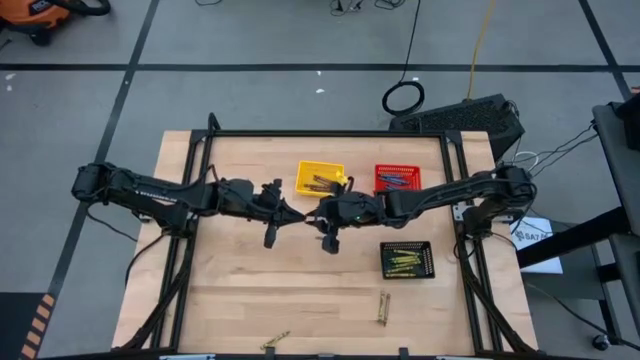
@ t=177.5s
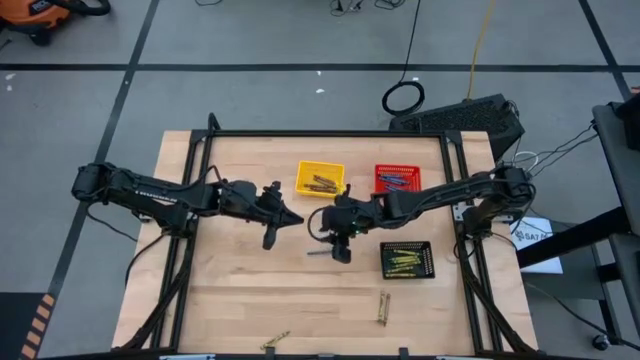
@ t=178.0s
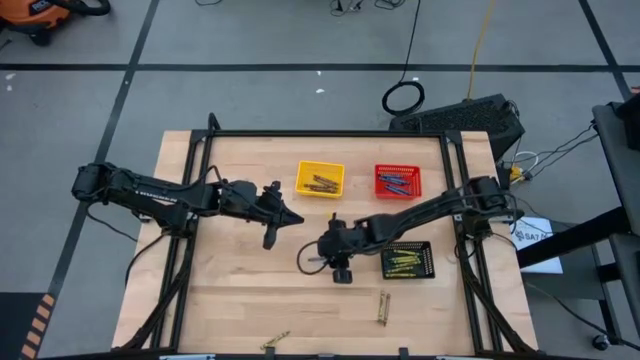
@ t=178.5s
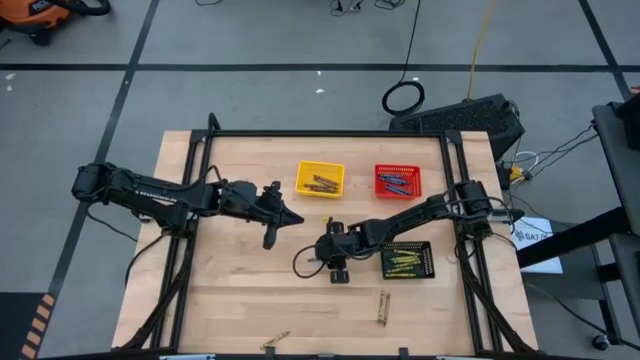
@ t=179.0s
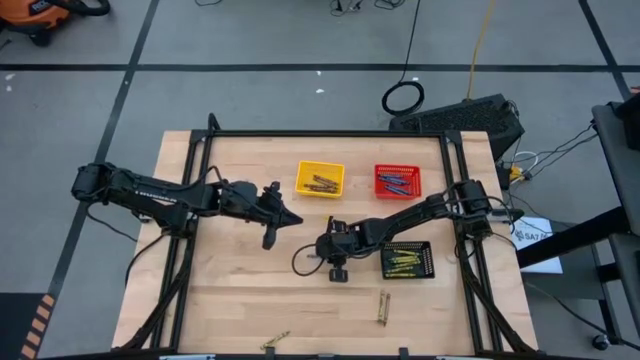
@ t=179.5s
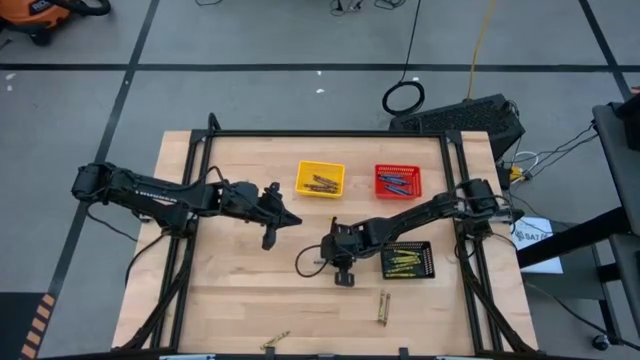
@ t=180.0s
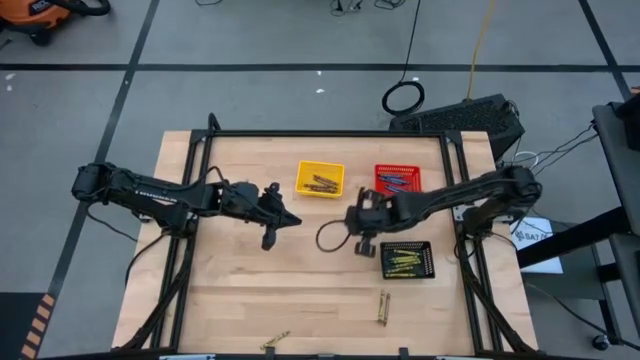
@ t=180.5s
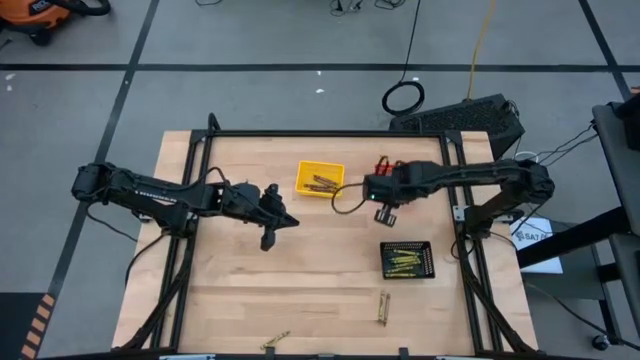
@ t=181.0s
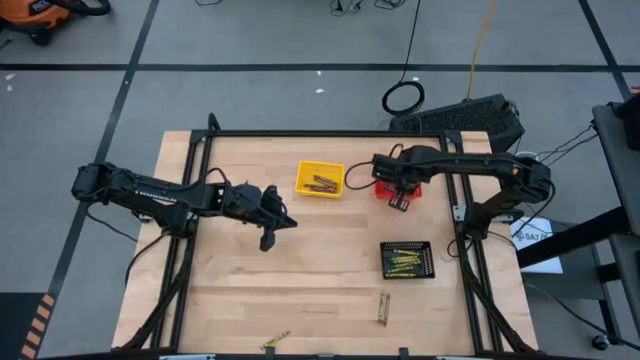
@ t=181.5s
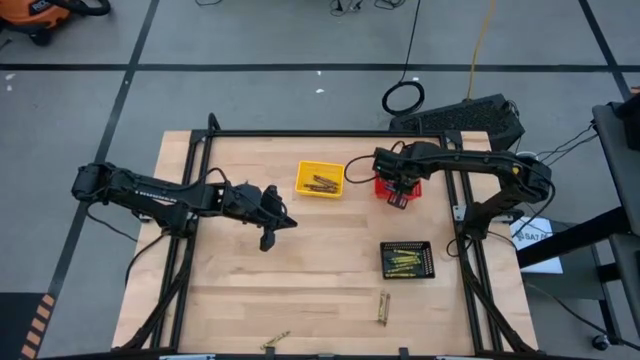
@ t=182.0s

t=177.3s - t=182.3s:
Task: Sort crayons
Put the blue crayon into the red bin

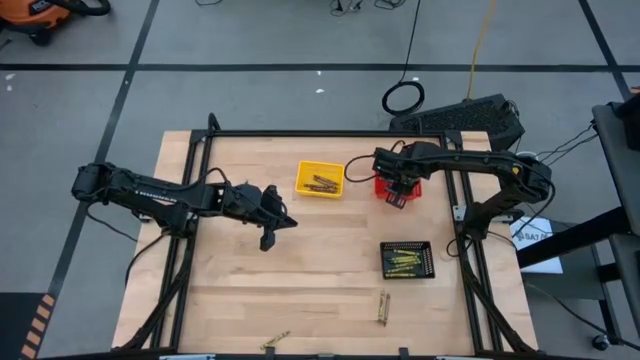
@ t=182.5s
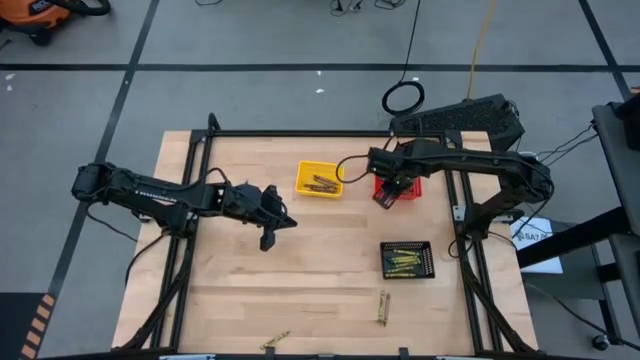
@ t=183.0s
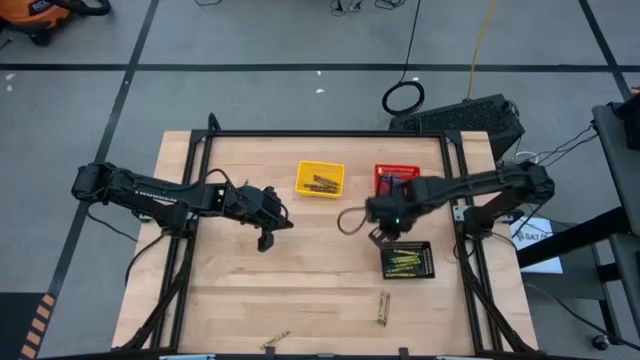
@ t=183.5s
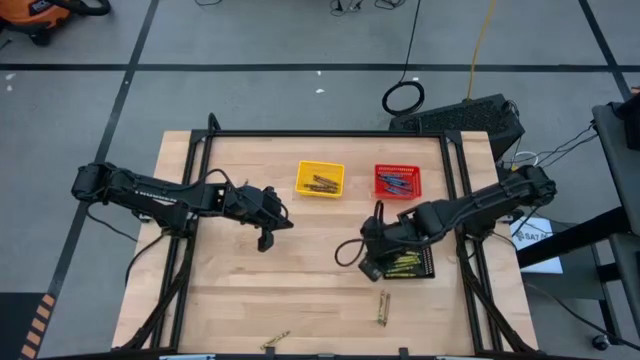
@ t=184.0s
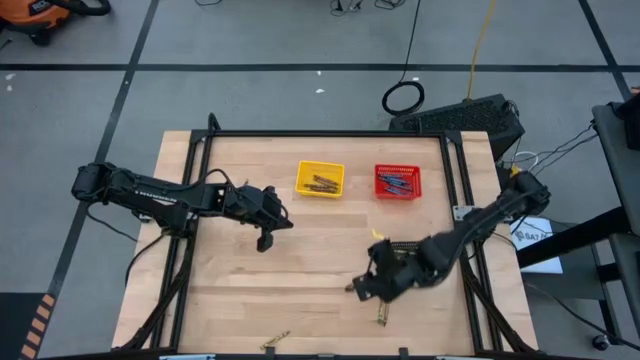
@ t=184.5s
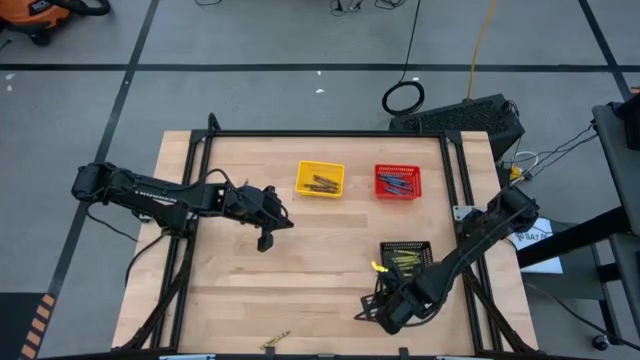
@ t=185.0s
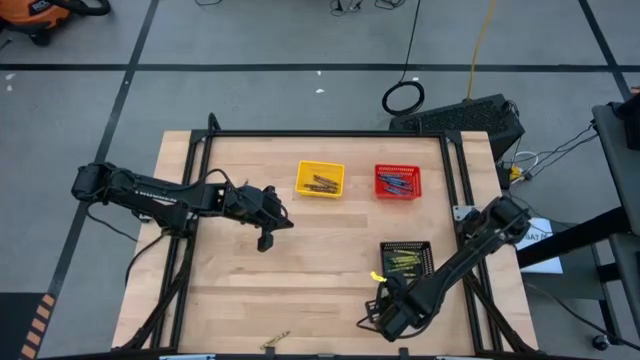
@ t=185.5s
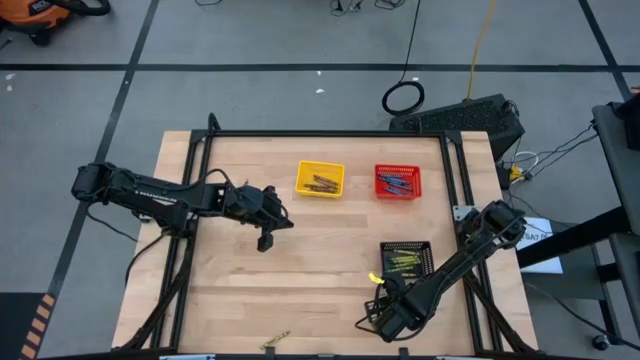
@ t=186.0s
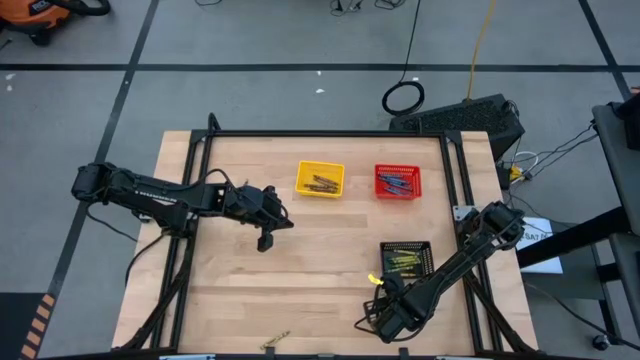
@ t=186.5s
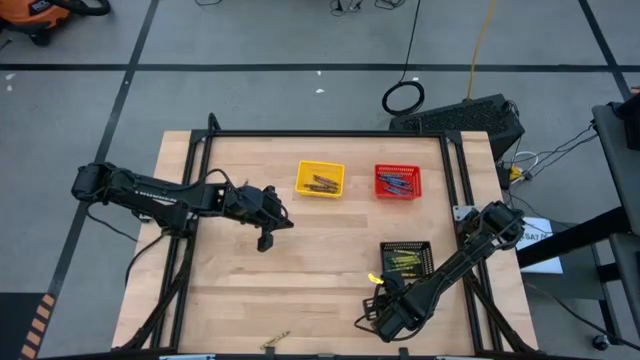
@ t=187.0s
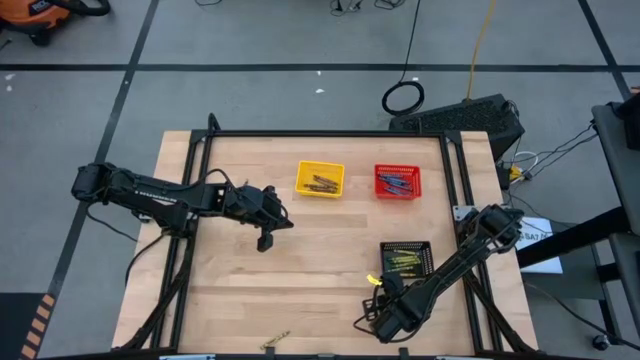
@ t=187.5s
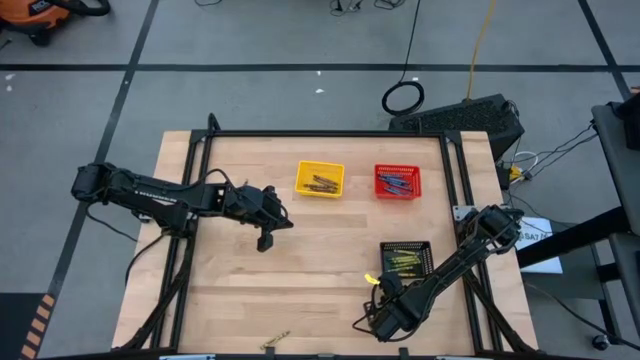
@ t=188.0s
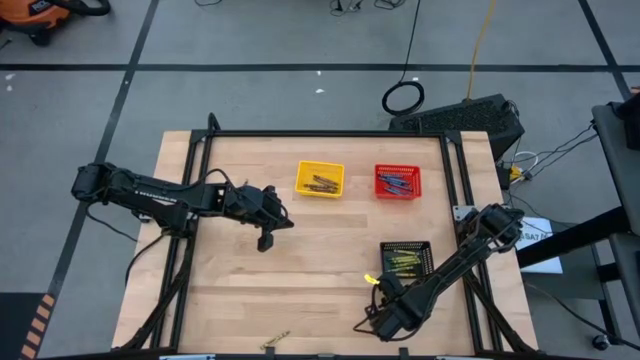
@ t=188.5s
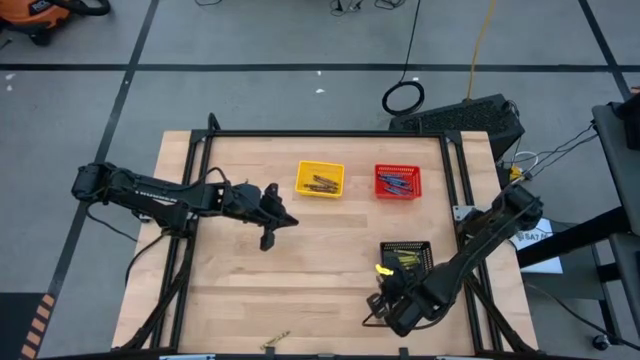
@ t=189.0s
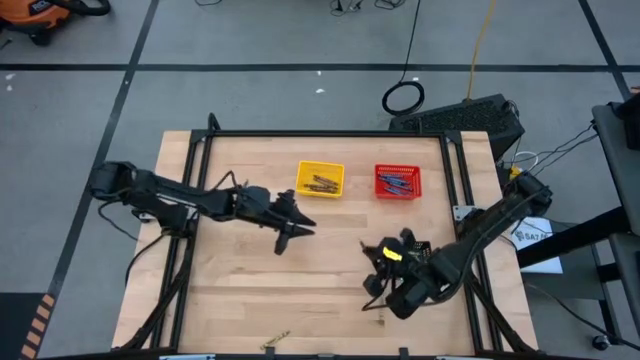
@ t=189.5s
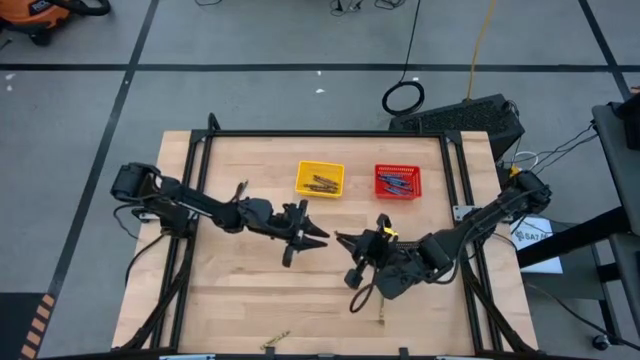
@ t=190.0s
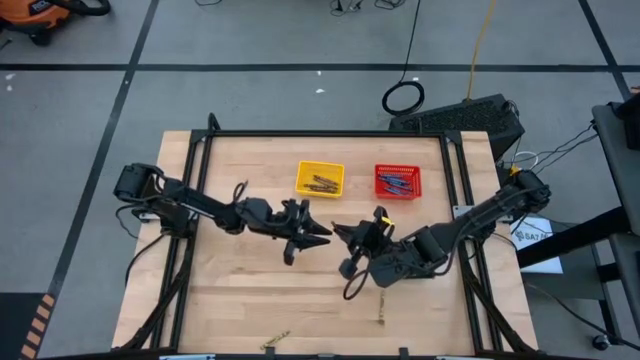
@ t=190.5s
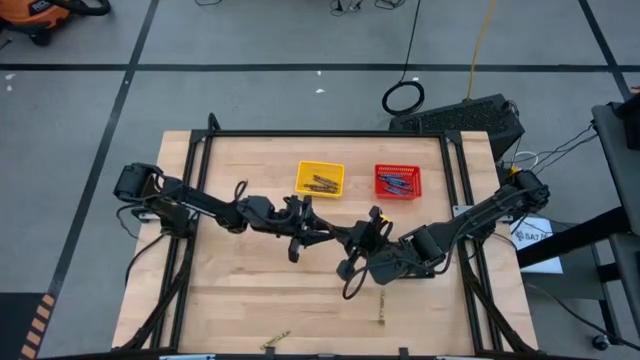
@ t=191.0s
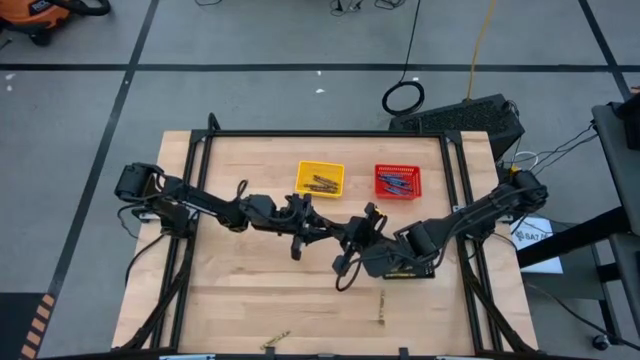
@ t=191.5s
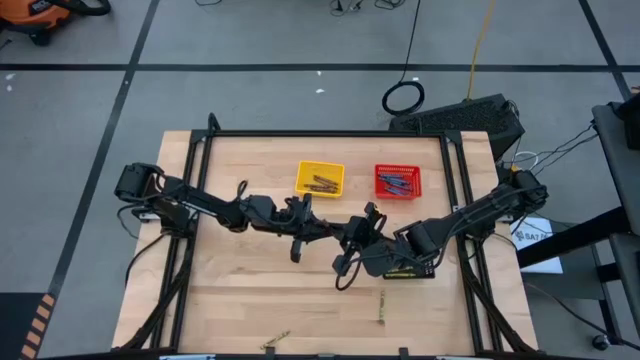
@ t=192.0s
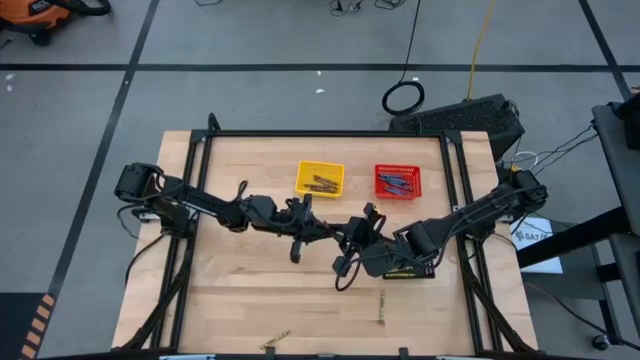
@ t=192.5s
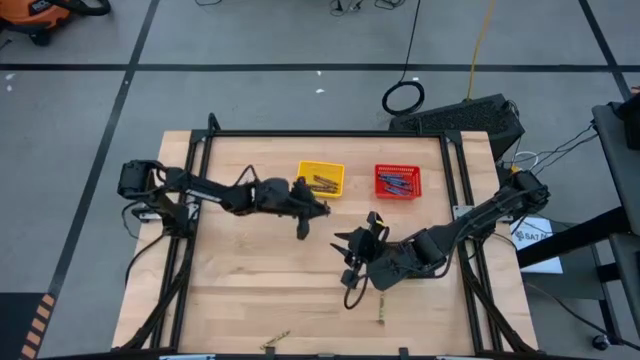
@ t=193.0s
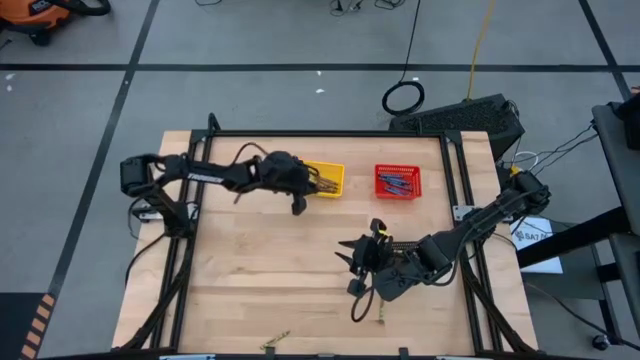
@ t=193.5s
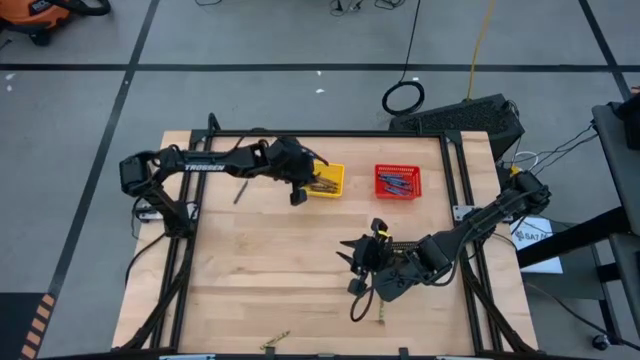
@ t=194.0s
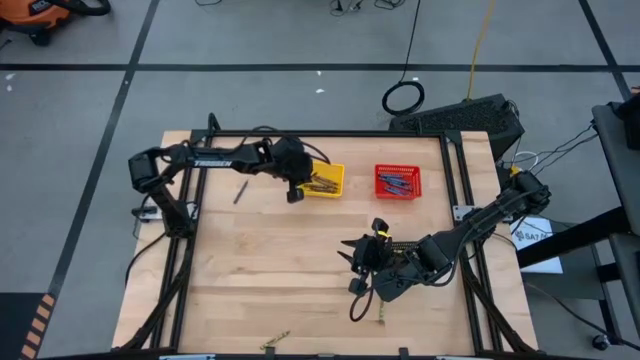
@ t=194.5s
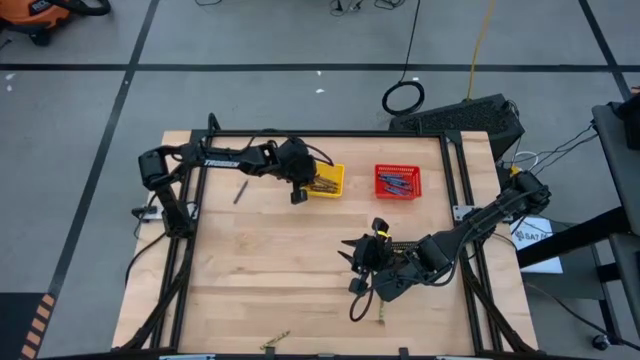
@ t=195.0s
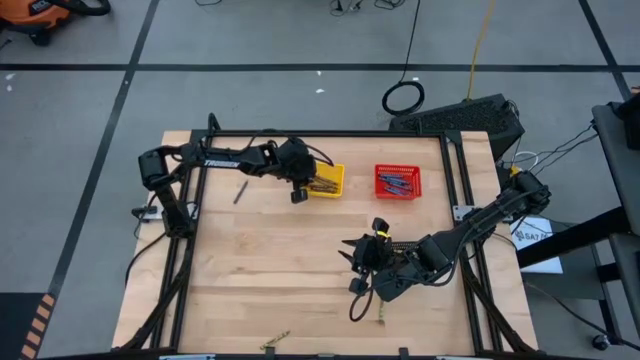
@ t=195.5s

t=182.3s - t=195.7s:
Put the brown crayon into the yellow bin

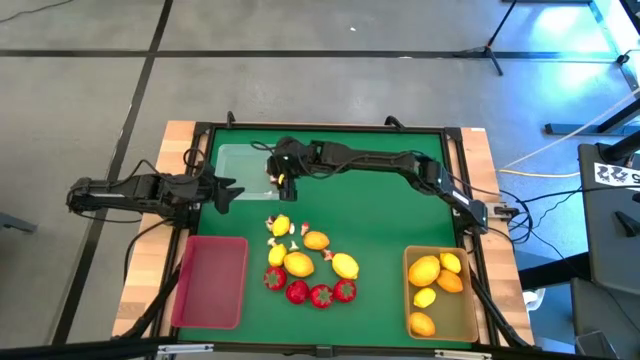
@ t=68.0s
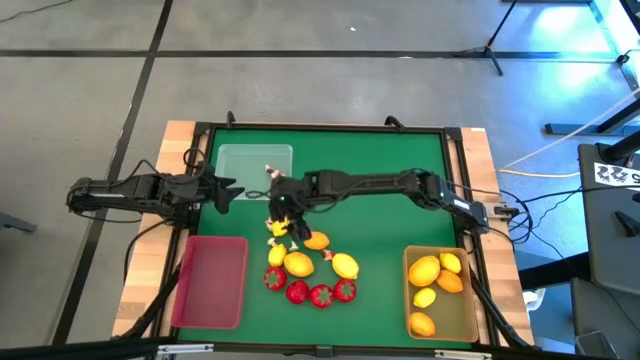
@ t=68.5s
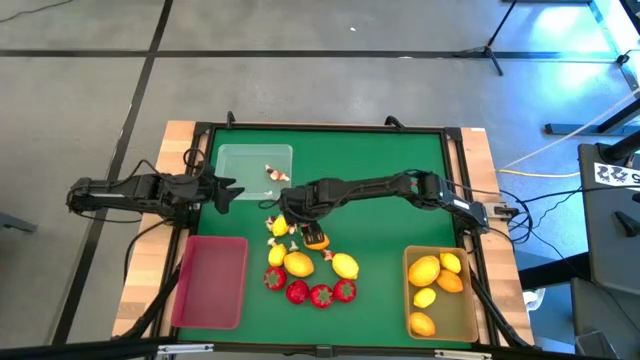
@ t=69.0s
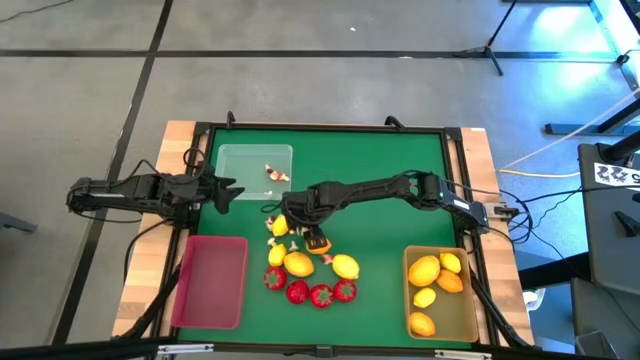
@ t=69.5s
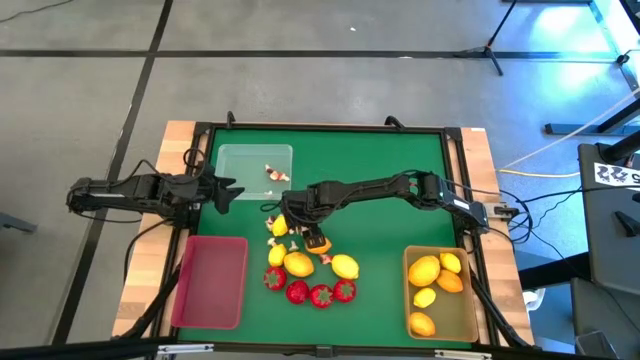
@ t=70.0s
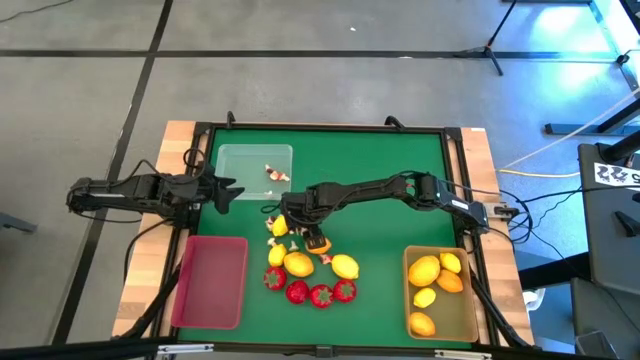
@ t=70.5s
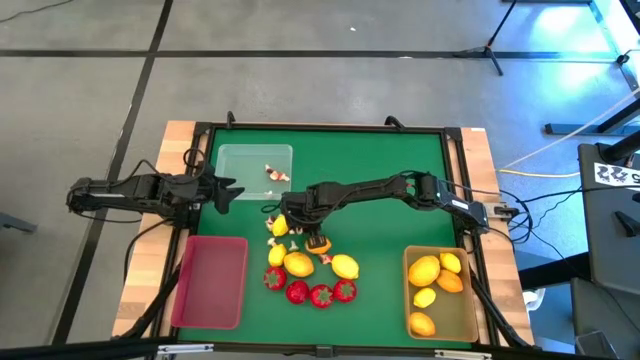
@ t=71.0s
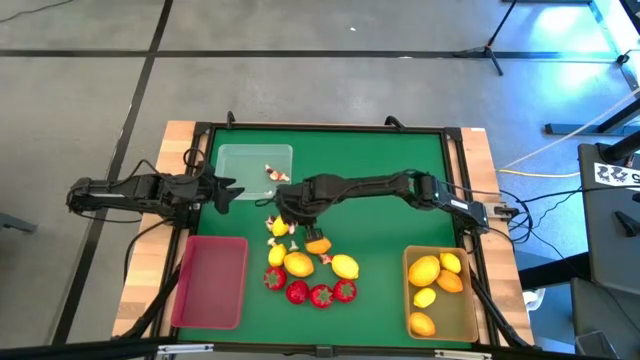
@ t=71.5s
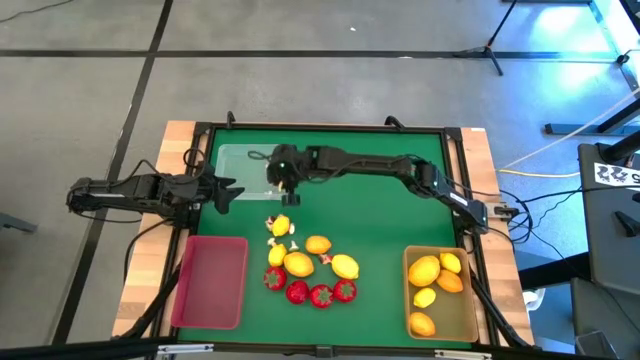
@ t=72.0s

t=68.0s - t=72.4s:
Task: Sort produce into baskets
Put the red mushroom into the transparent bin
